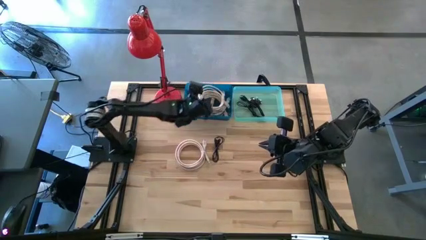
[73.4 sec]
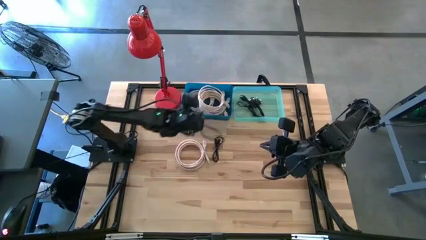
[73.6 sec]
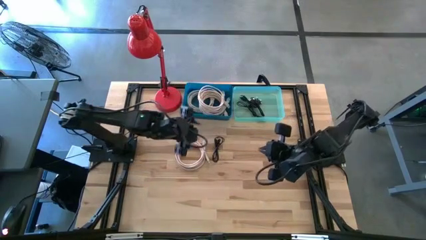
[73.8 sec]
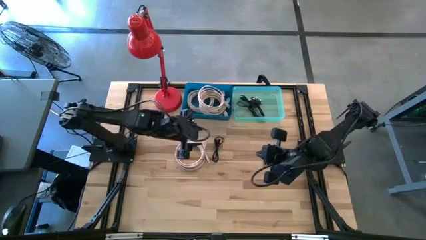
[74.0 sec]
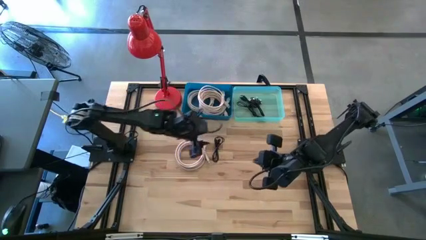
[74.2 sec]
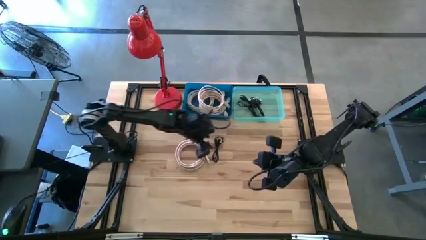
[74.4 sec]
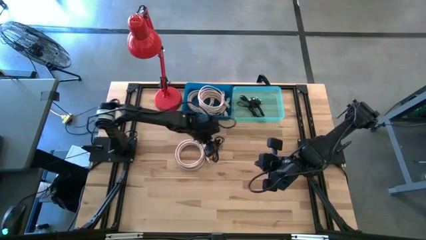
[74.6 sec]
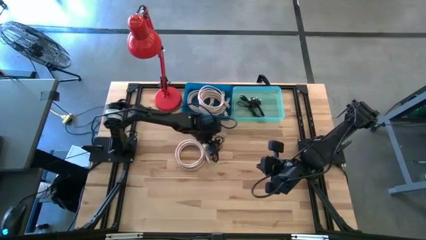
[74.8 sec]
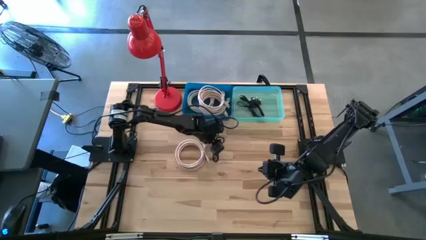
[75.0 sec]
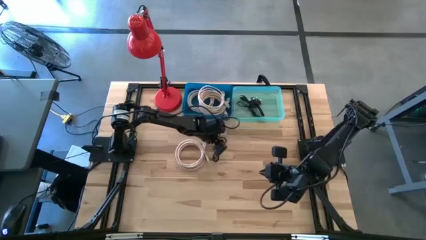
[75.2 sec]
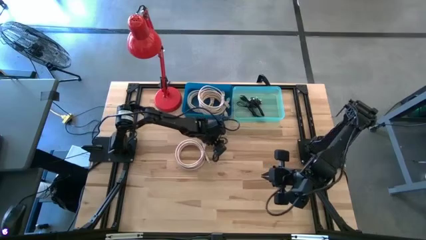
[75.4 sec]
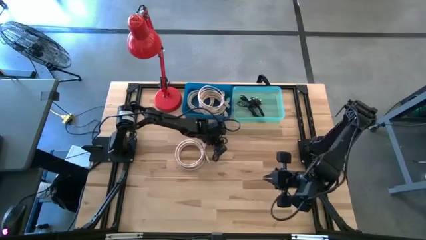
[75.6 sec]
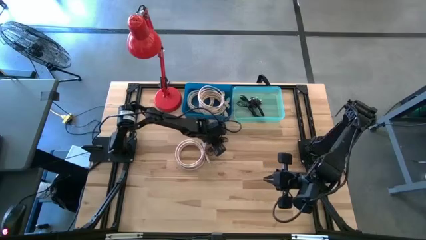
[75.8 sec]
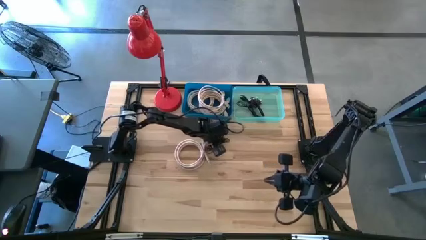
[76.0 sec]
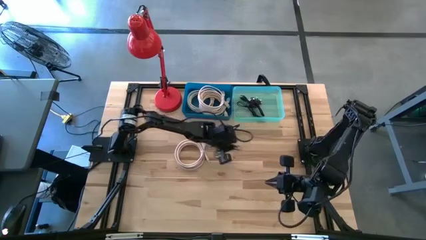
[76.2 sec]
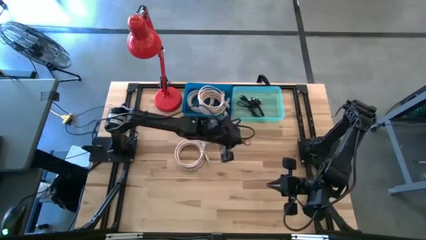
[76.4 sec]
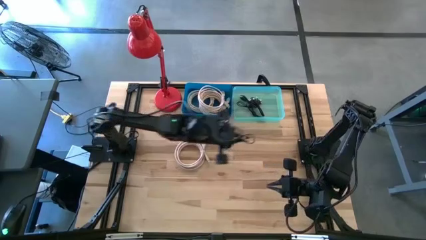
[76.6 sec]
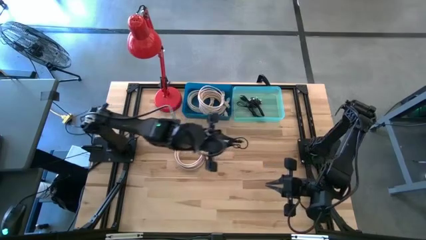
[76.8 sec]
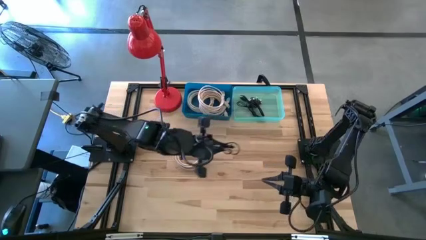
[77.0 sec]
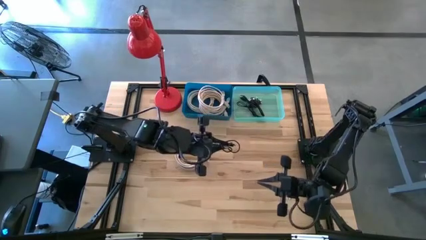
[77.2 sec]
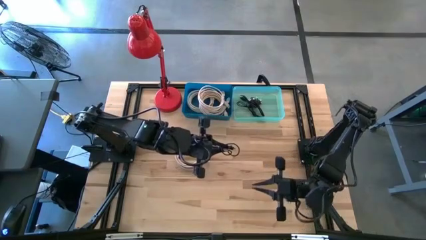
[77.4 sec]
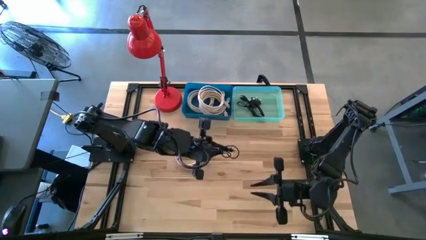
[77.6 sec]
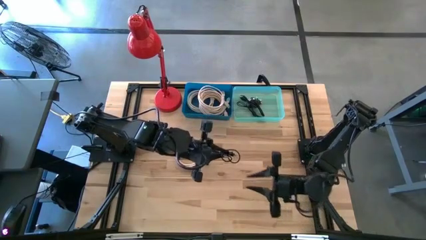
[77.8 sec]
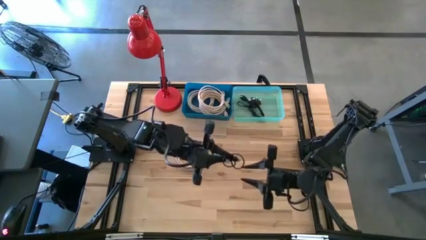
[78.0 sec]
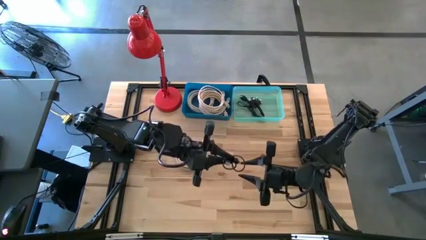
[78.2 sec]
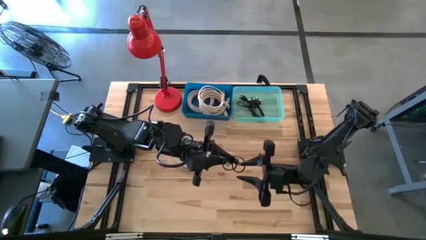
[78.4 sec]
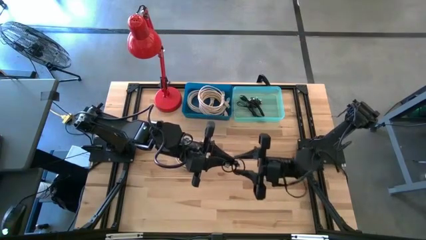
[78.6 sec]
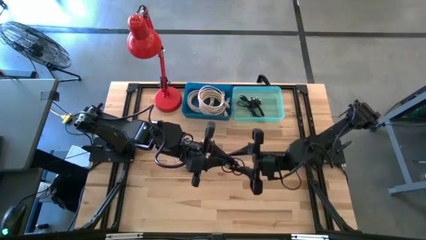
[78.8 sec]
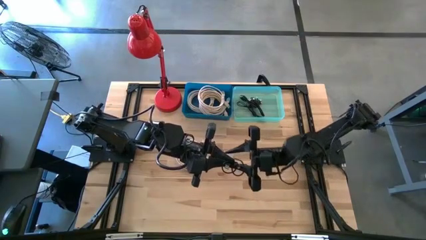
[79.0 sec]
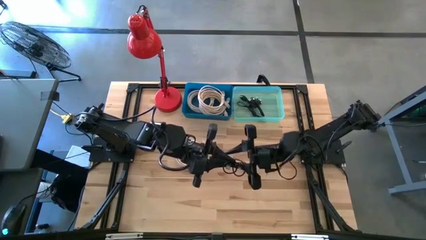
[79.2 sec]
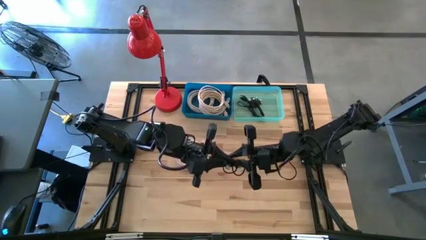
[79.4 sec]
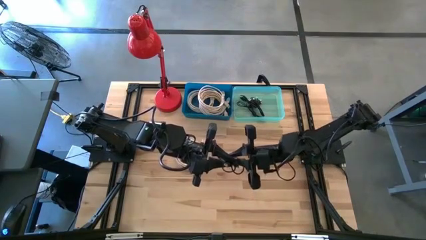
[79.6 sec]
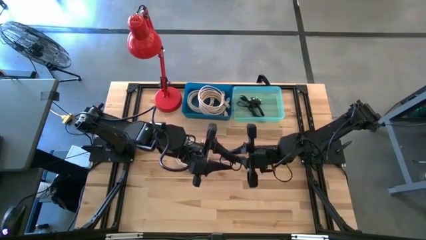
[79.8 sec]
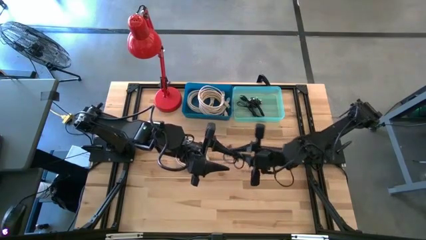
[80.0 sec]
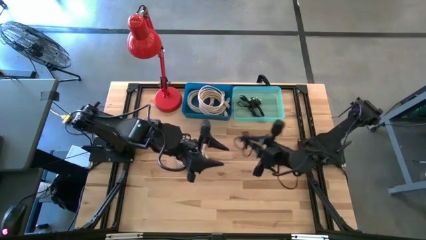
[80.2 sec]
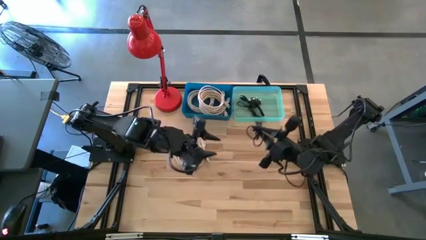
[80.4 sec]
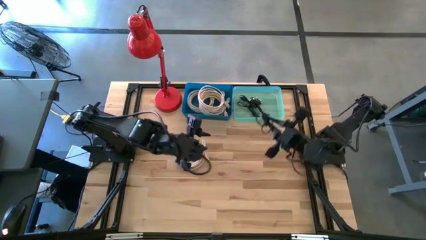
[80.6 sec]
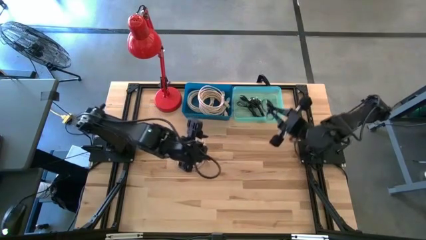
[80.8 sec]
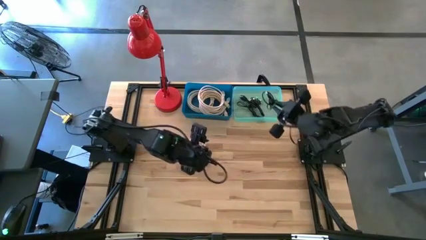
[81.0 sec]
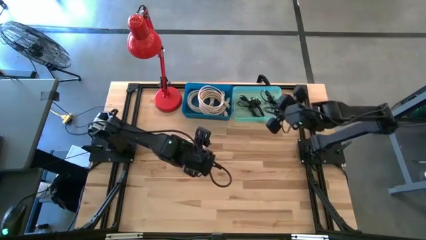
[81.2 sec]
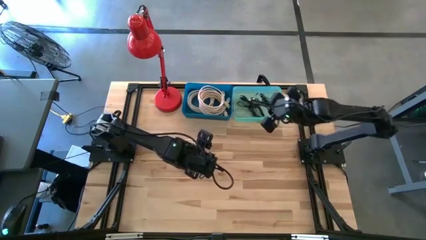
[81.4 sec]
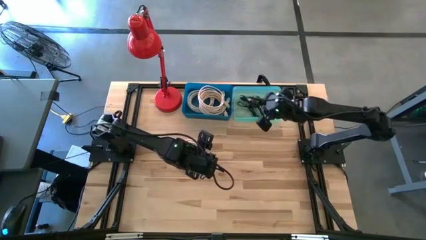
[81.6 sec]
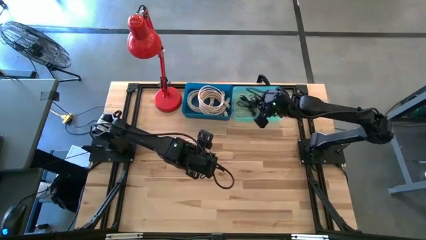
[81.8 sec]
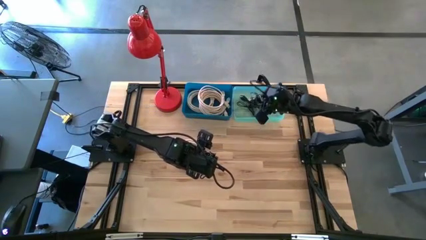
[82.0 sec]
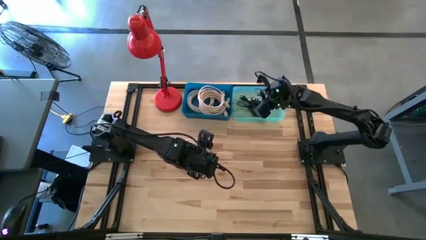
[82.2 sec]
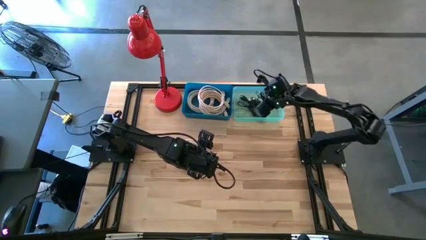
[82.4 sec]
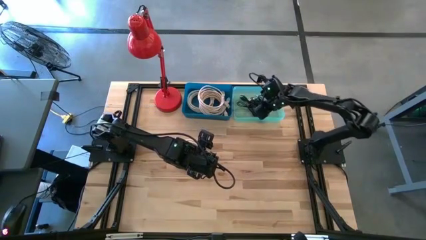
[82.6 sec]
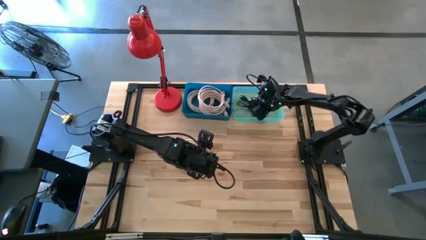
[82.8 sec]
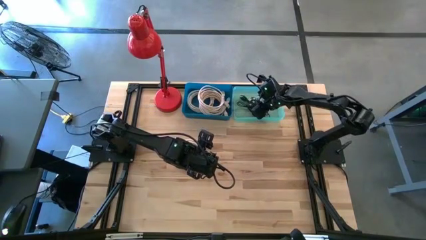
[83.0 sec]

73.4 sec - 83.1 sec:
Task: Pick & Place USB Port
Put the black charger cable into the green bin

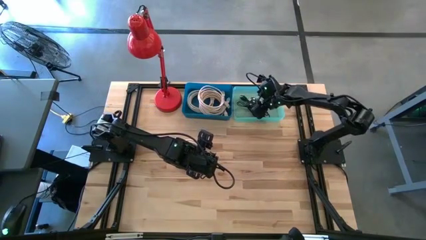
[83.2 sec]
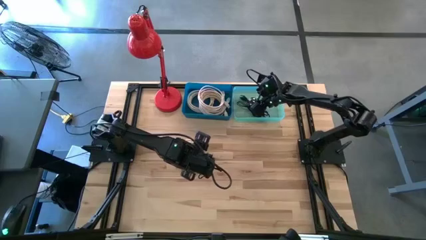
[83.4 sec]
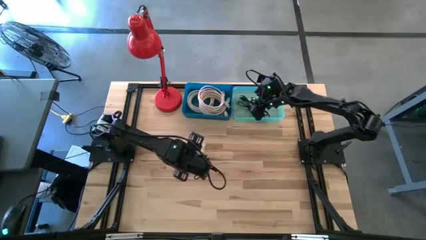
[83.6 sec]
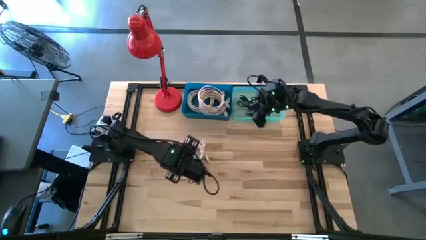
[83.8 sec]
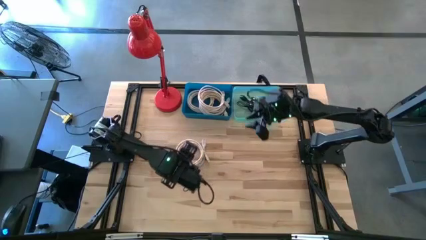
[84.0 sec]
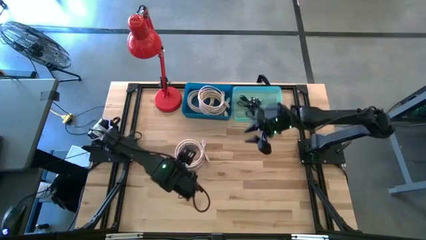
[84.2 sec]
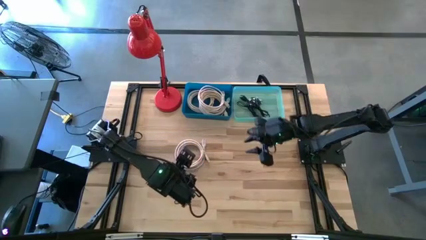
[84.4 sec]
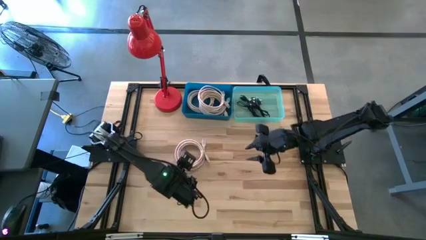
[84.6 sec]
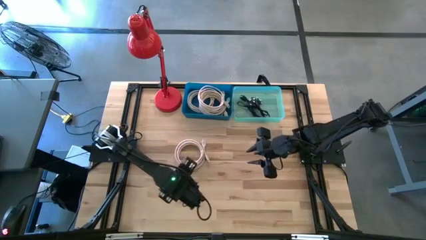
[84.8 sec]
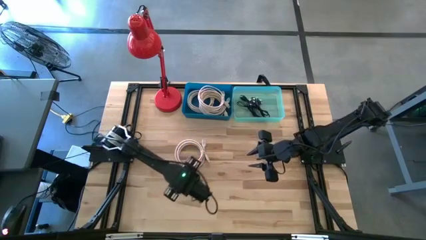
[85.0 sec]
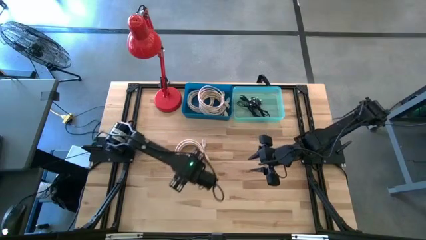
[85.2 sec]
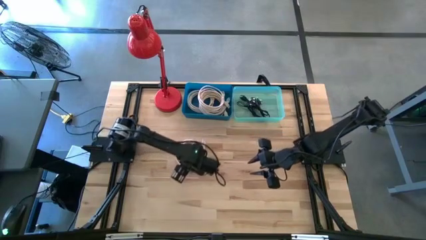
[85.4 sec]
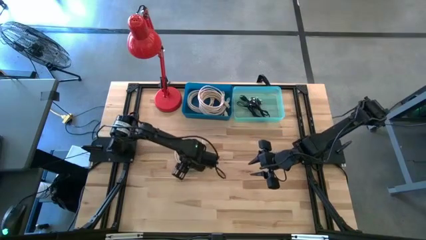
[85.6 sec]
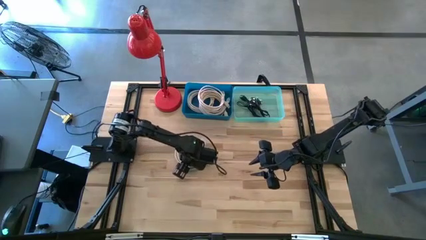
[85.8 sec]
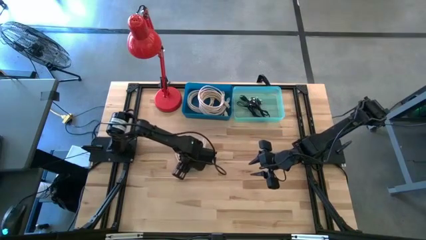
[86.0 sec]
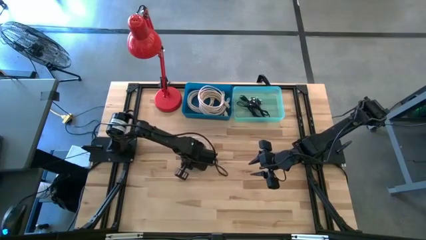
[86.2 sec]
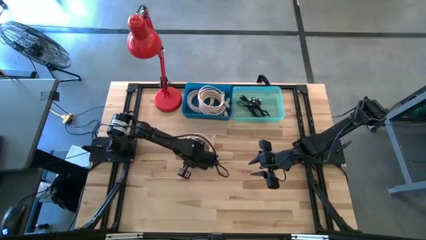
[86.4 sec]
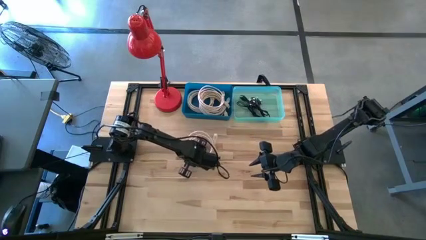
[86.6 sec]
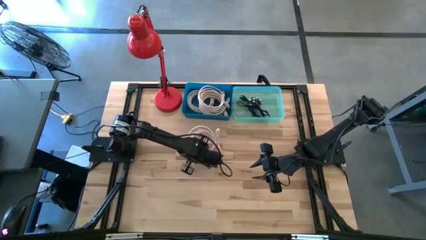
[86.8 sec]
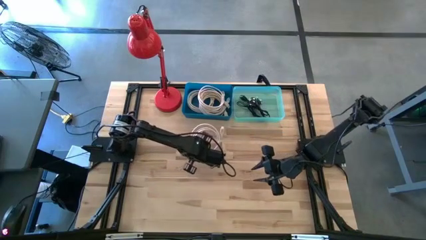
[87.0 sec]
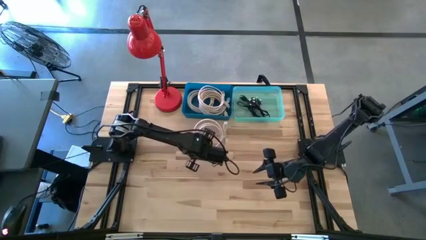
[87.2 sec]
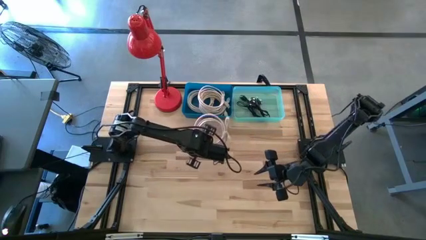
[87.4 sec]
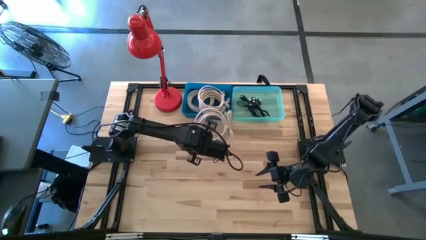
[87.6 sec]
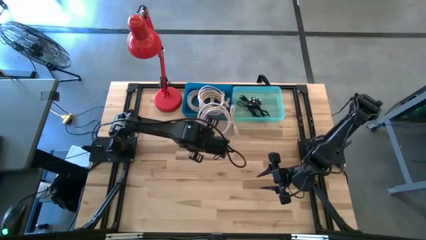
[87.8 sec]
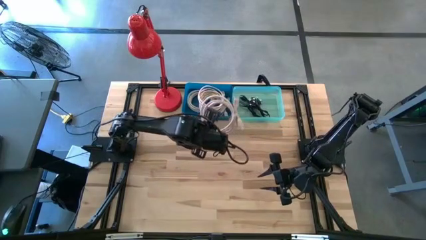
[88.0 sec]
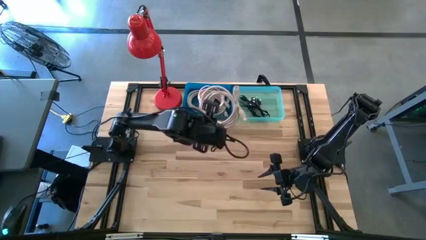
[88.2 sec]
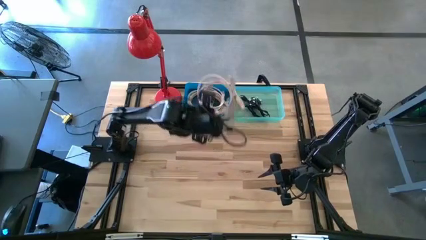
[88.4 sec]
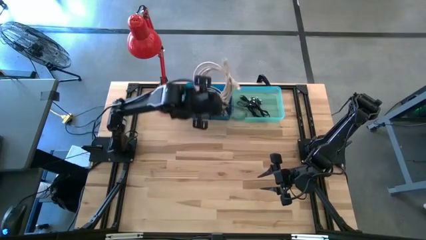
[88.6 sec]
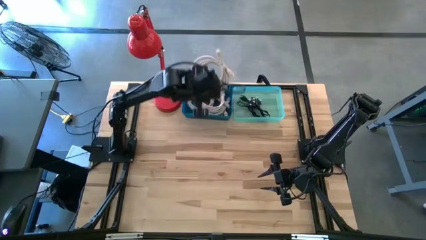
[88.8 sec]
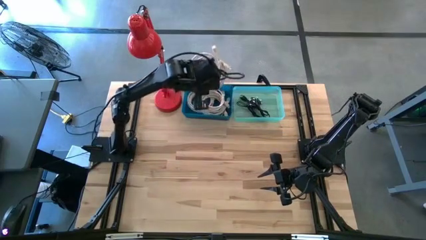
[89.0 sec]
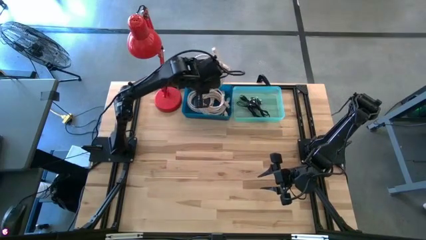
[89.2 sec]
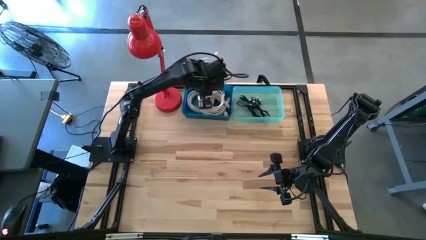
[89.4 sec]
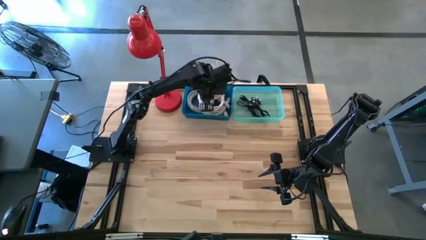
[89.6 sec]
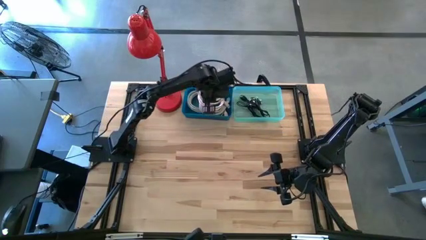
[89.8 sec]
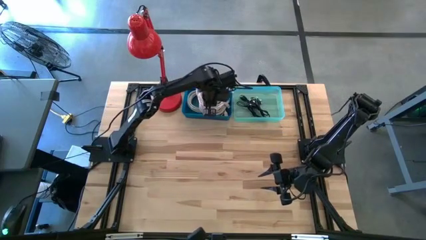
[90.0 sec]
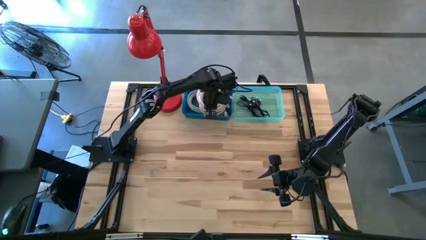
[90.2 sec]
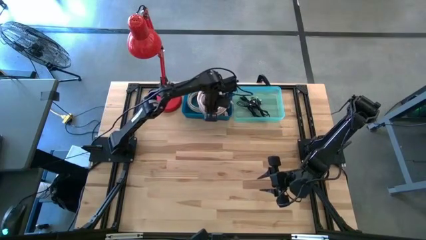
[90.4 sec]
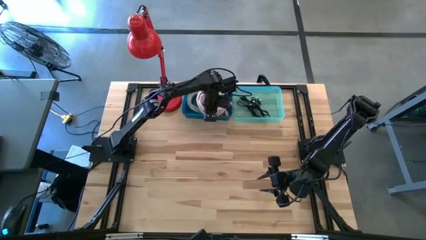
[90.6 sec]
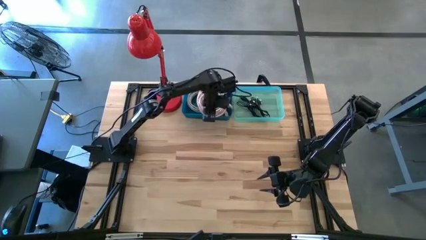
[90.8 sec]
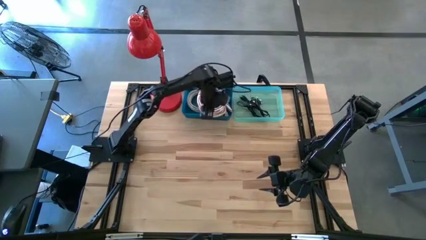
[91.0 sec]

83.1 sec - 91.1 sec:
Put the brown charger cable into the blue bin
